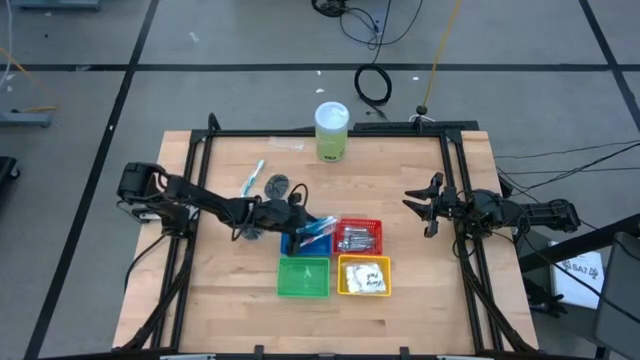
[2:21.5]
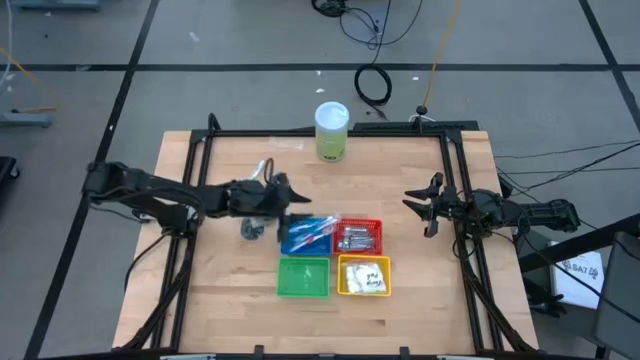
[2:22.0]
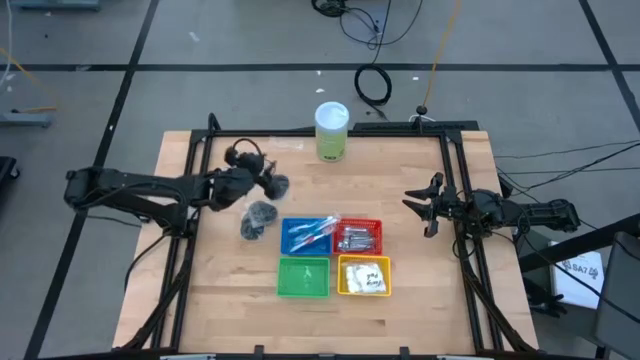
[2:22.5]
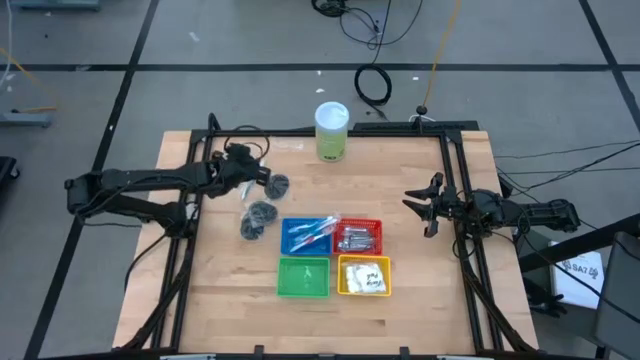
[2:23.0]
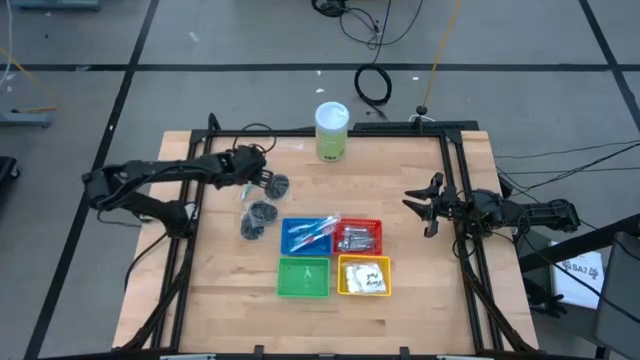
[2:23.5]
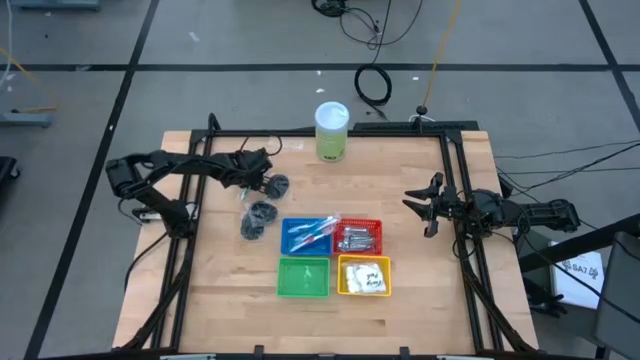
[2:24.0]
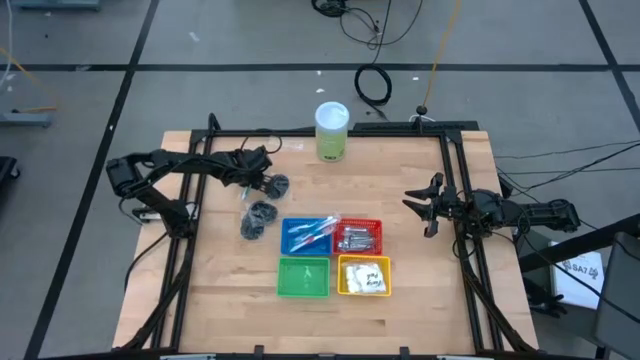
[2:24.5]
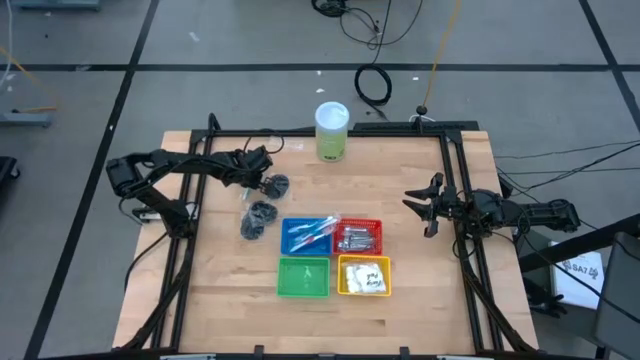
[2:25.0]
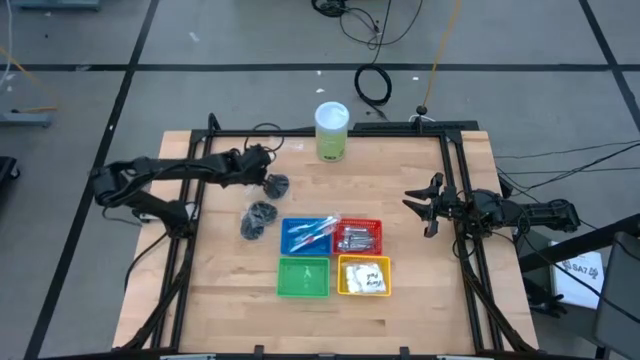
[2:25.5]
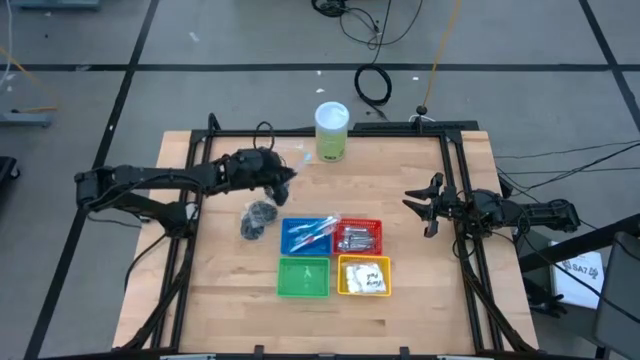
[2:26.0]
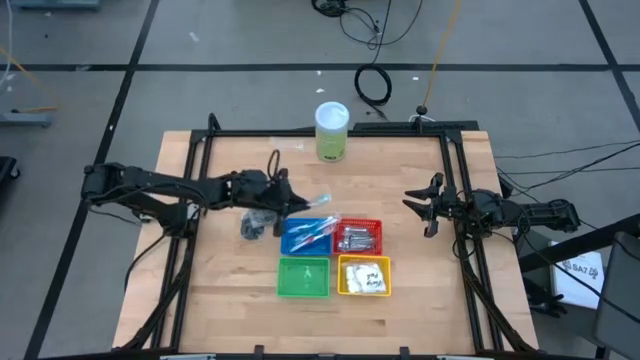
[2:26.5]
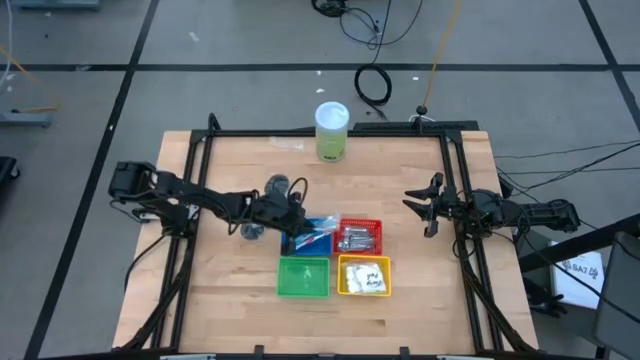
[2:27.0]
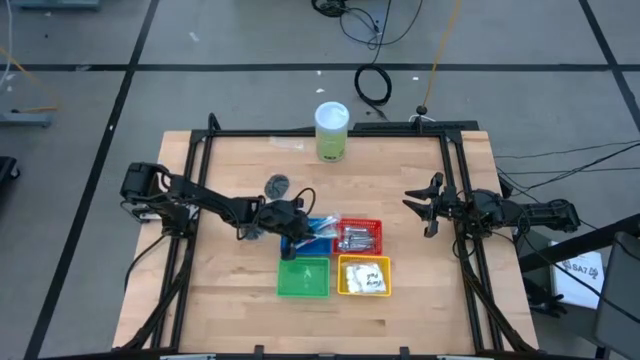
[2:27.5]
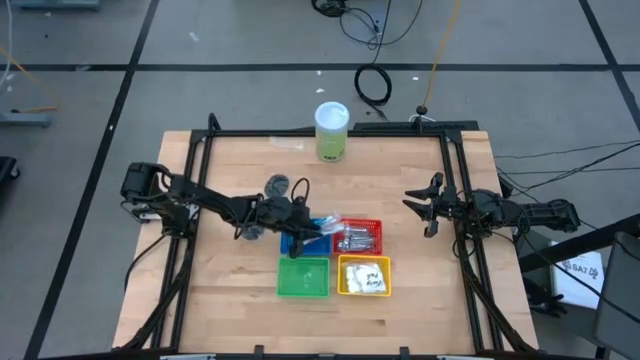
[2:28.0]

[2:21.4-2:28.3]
Task: Pick & Place Travel size toiletries
Put the green toothbrush into the blue basket

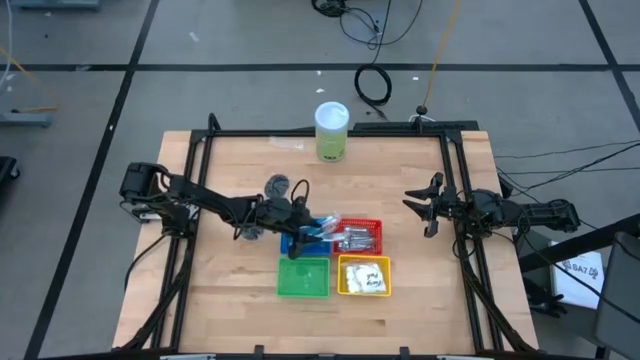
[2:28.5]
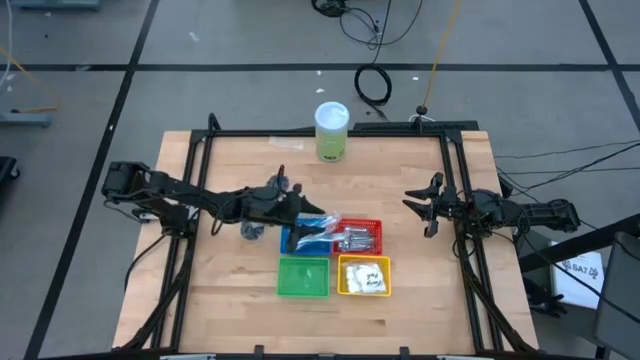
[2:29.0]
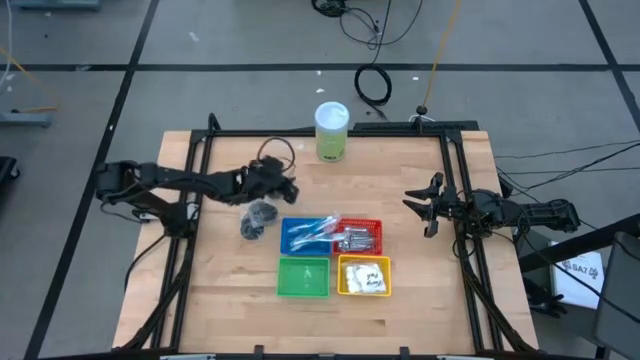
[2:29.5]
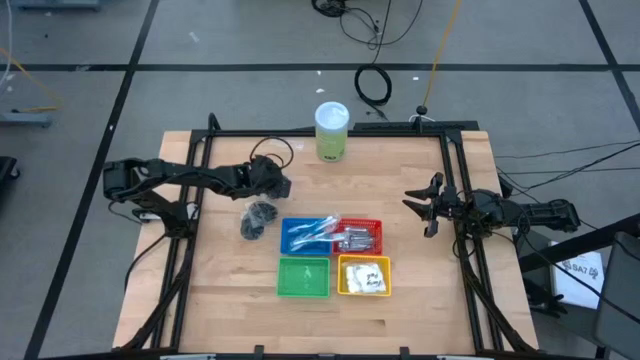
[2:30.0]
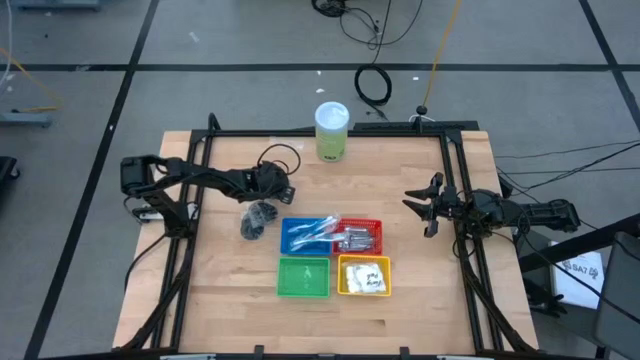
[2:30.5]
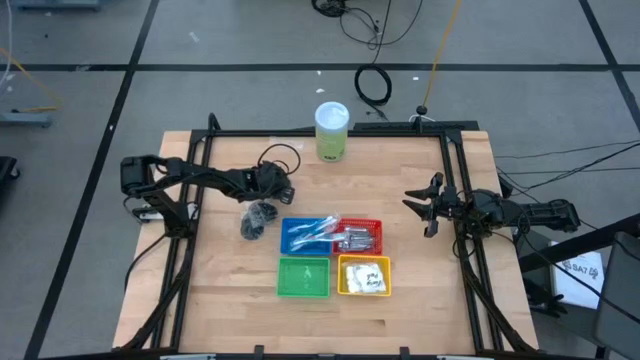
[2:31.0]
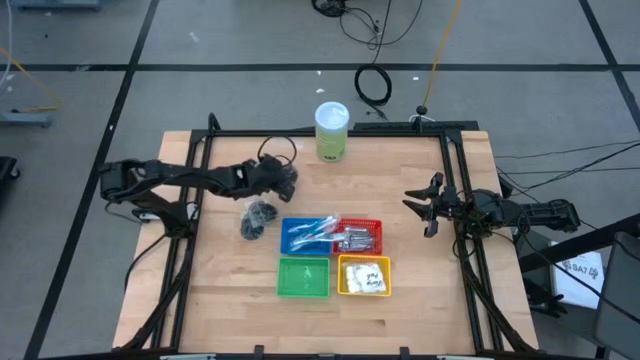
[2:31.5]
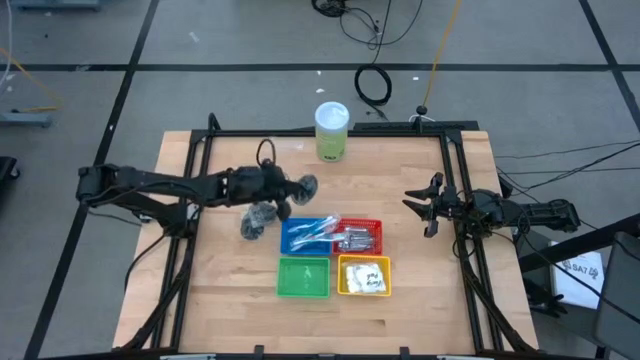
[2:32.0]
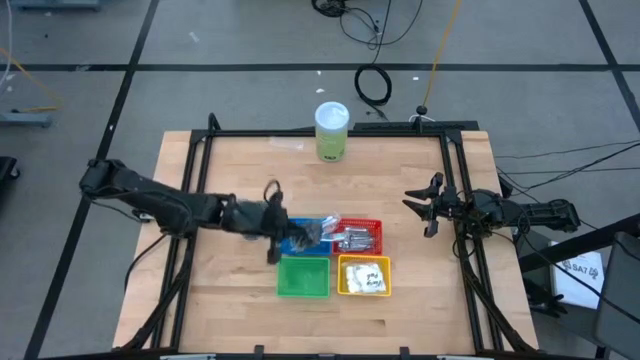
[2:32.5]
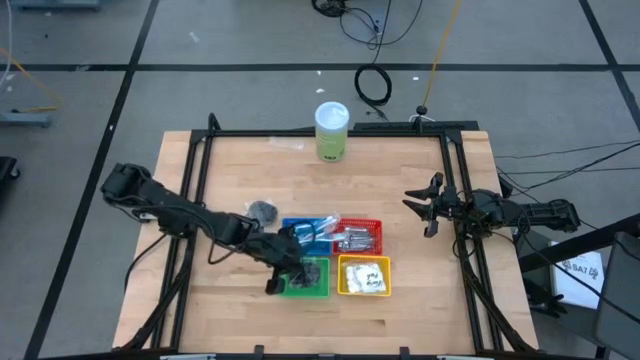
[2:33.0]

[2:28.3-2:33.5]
Put the top black hairbrush into the green basket

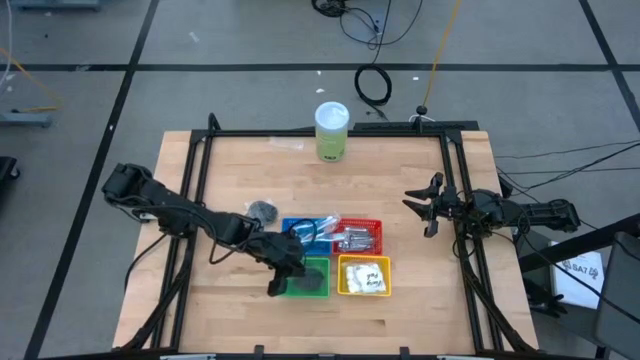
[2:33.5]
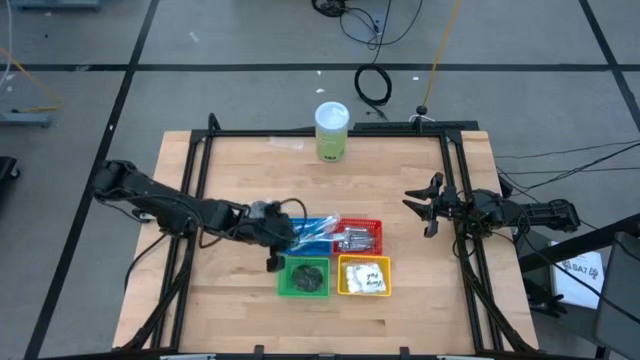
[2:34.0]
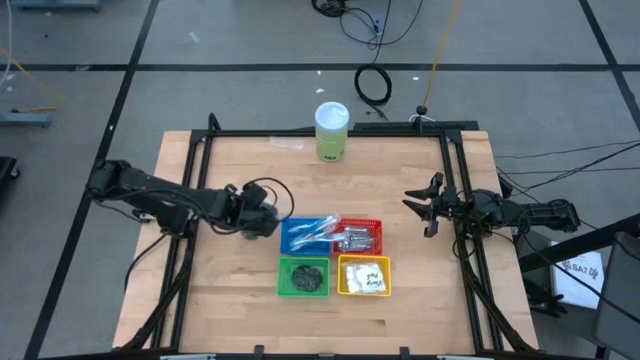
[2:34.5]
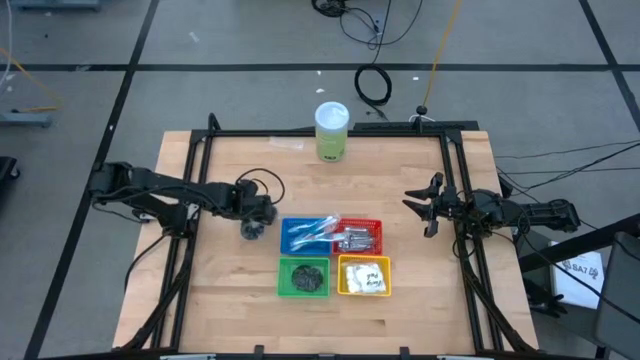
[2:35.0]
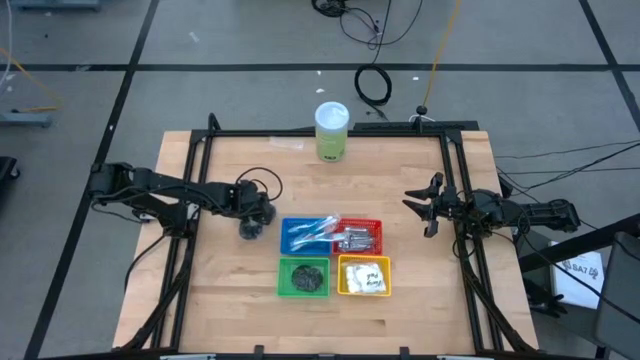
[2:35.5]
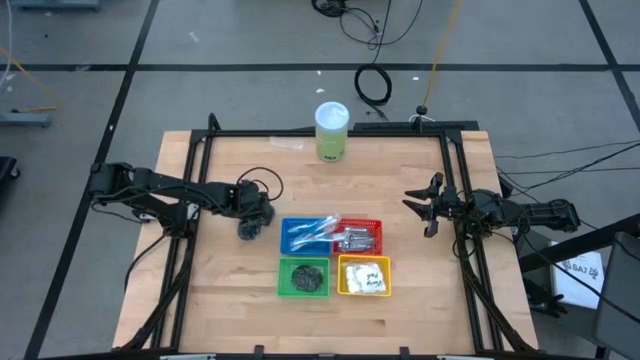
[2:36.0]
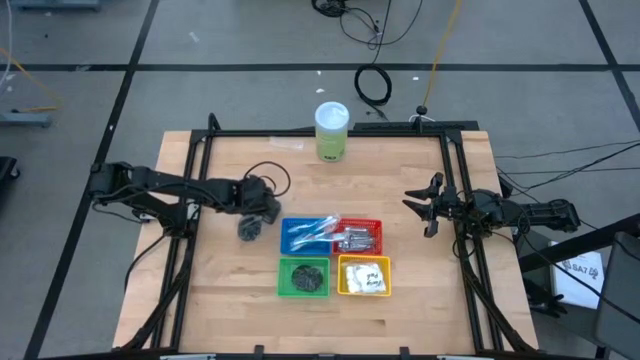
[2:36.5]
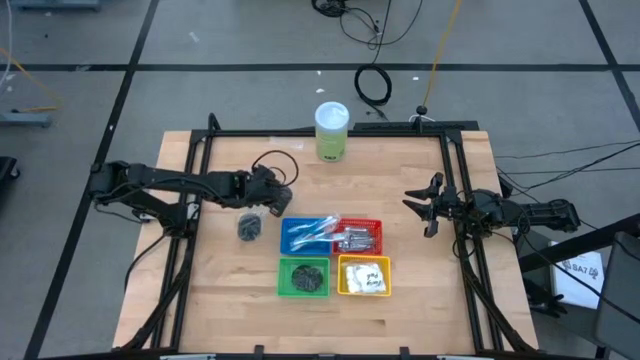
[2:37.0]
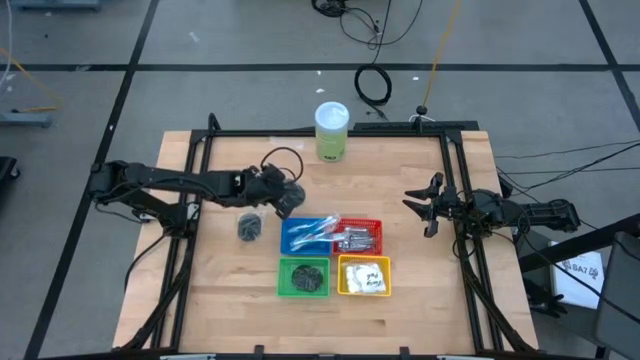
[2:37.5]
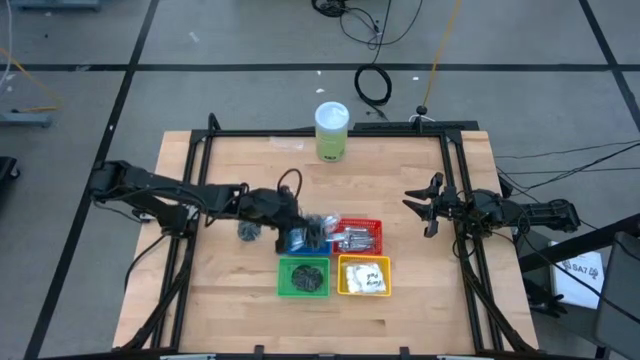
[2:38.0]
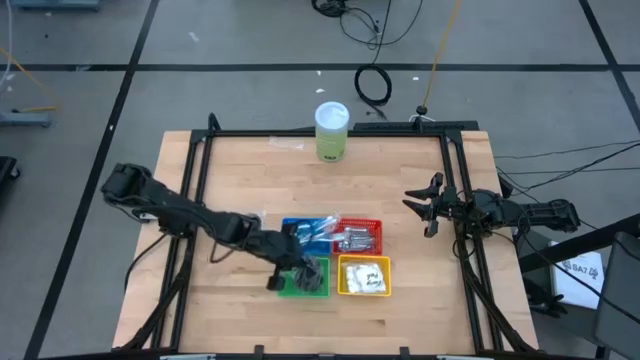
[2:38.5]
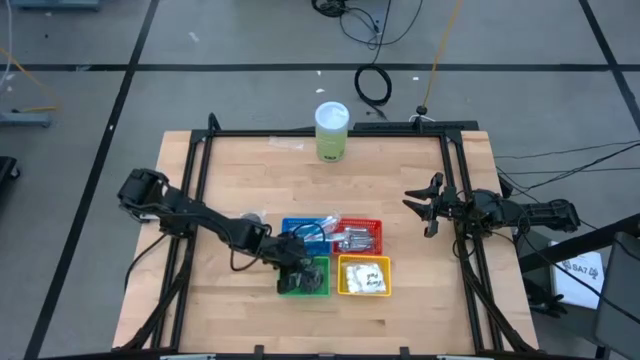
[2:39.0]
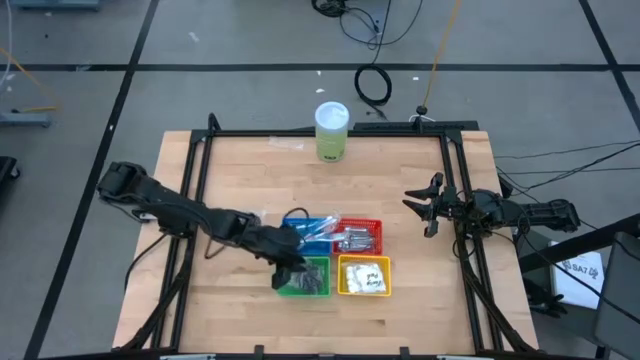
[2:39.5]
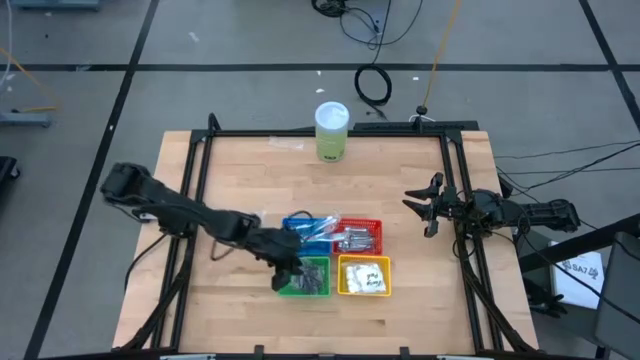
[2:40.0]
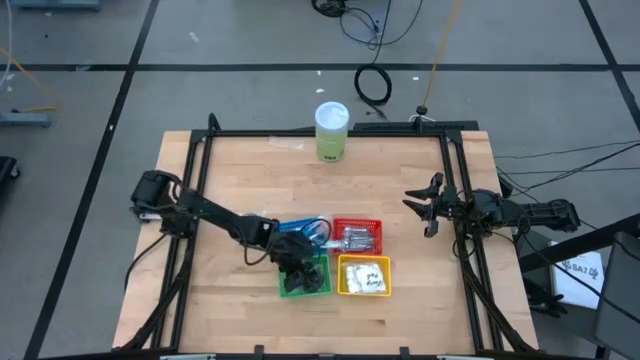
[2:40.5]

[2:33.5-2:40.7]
Put the top black hairbrush into the green basket

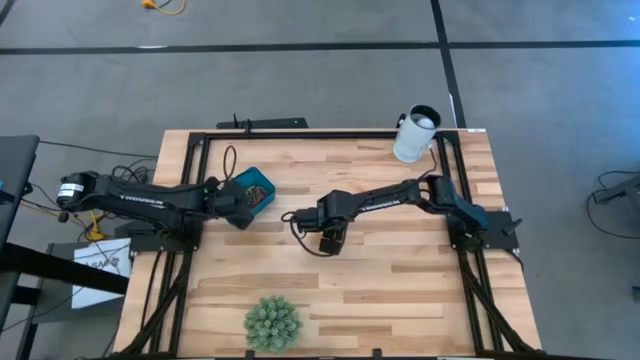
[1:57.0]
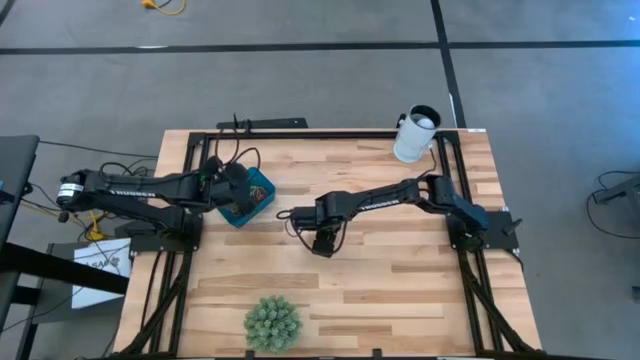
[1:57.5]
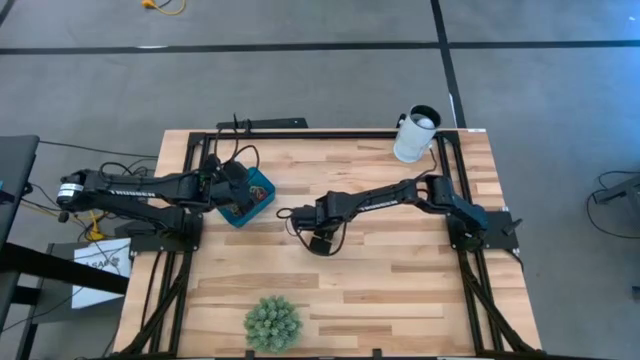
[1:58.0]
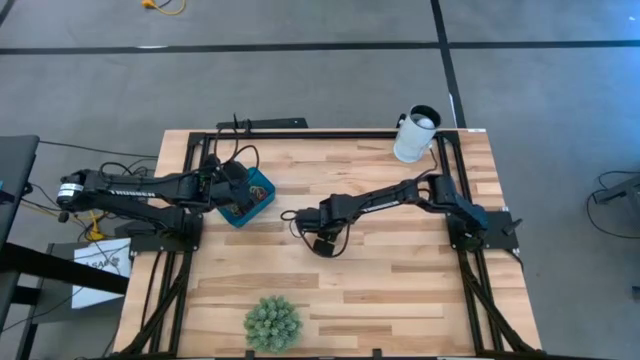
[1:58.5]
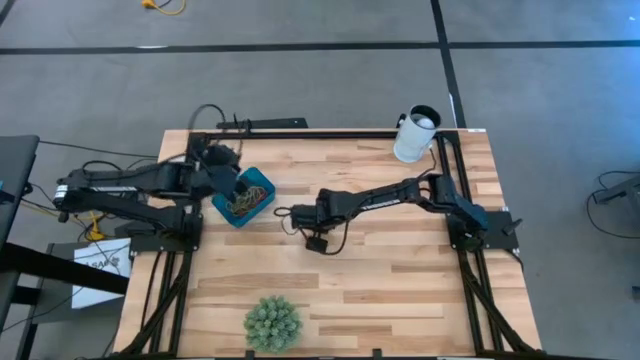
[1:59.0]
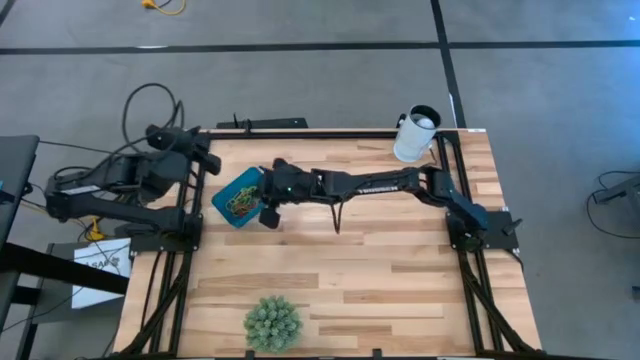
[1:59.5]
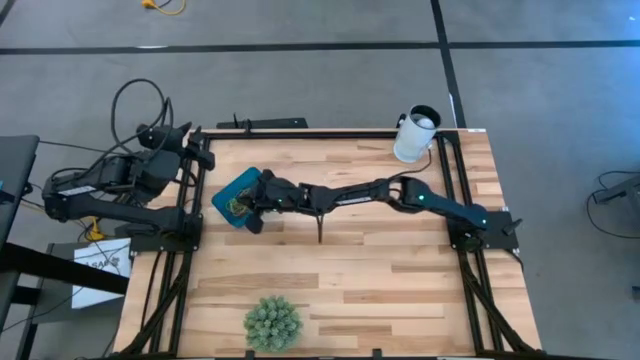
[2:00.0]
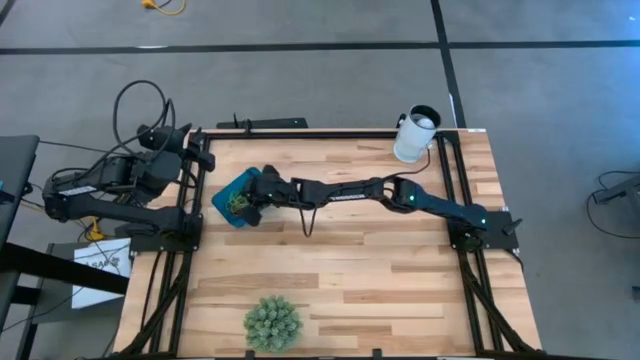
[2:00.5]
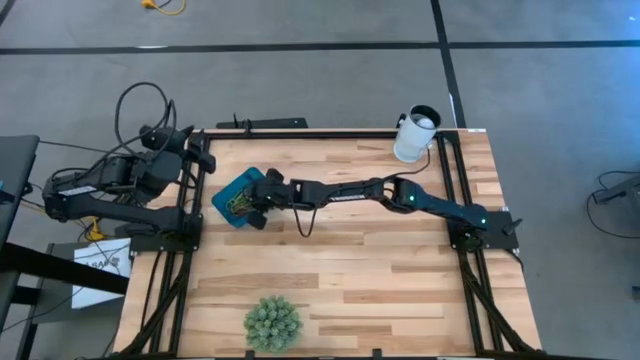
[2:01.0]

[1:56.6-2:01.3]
Task: Pick and place items into bin
Put the green rubber band into the blue bin
